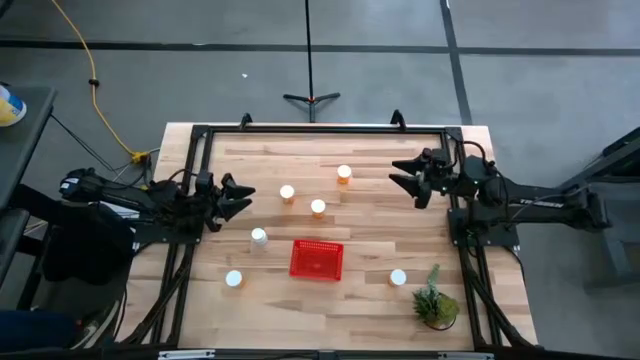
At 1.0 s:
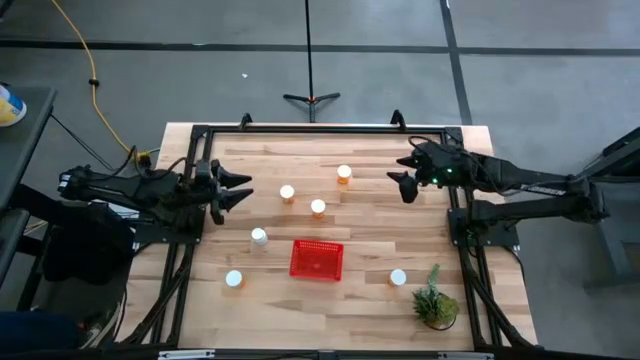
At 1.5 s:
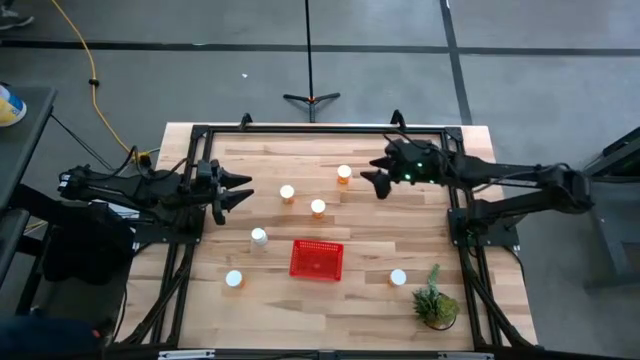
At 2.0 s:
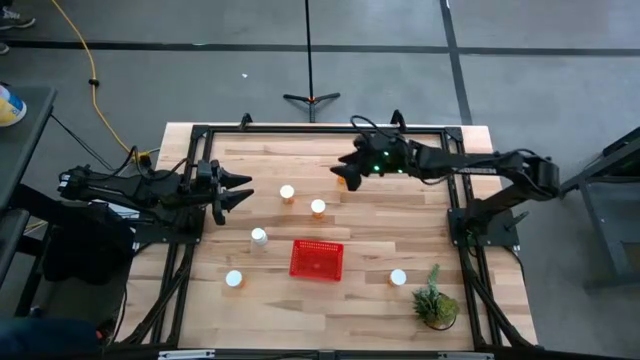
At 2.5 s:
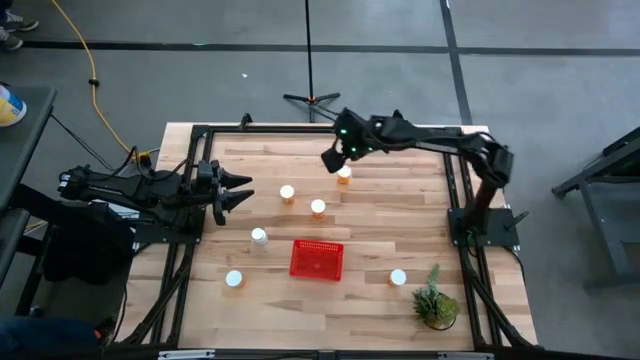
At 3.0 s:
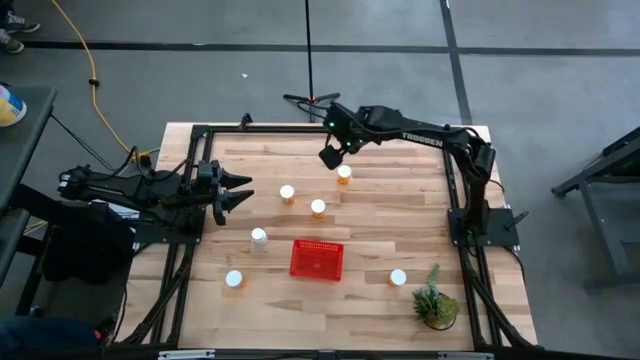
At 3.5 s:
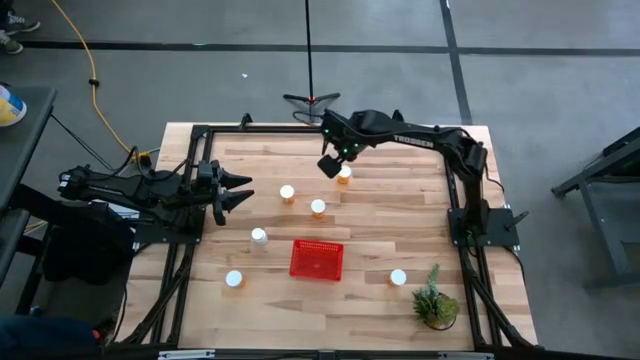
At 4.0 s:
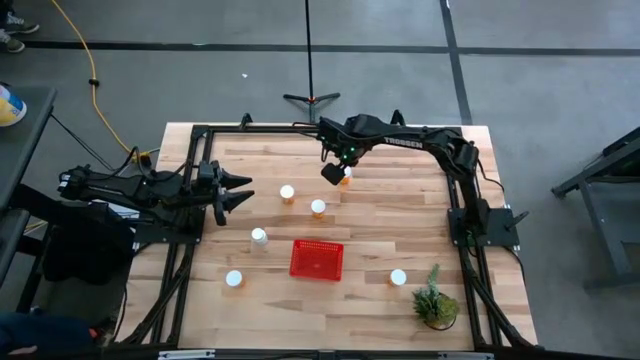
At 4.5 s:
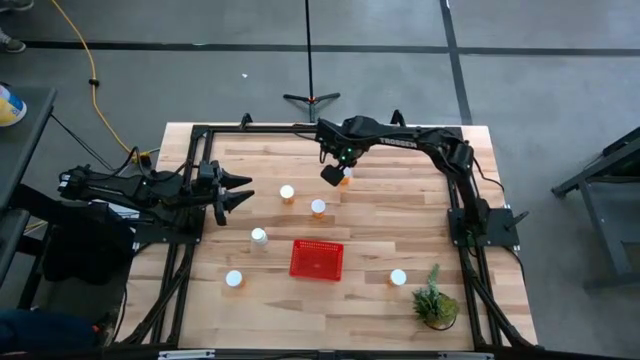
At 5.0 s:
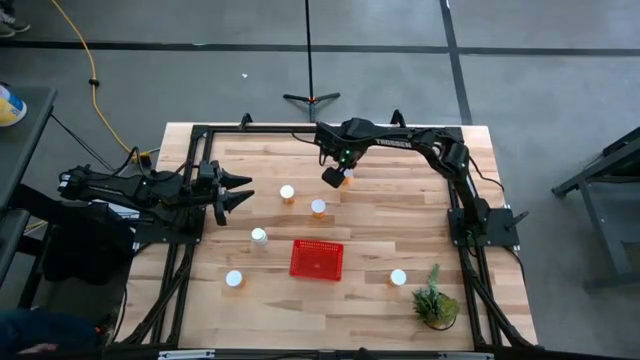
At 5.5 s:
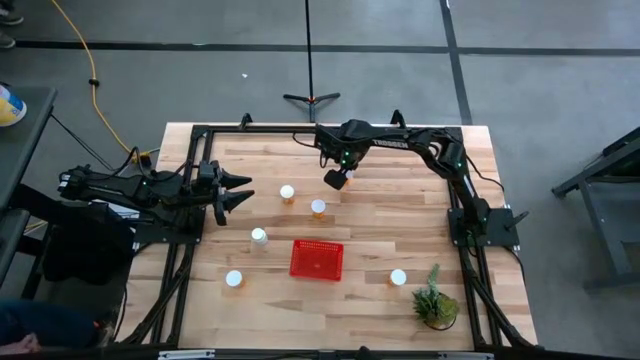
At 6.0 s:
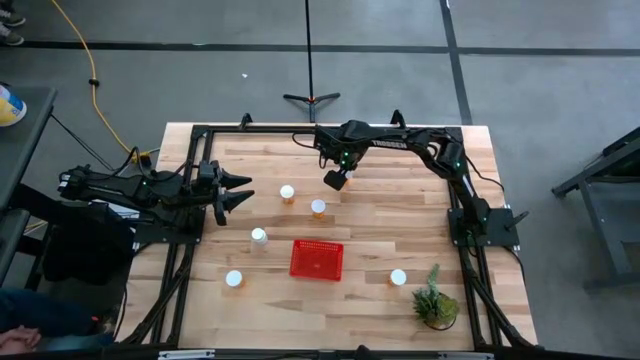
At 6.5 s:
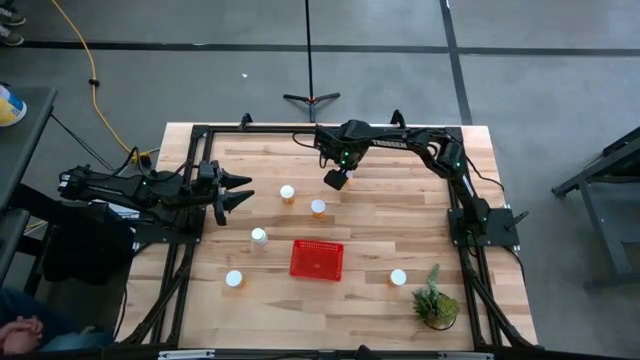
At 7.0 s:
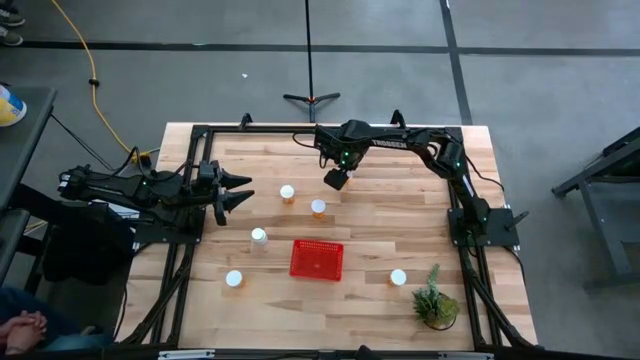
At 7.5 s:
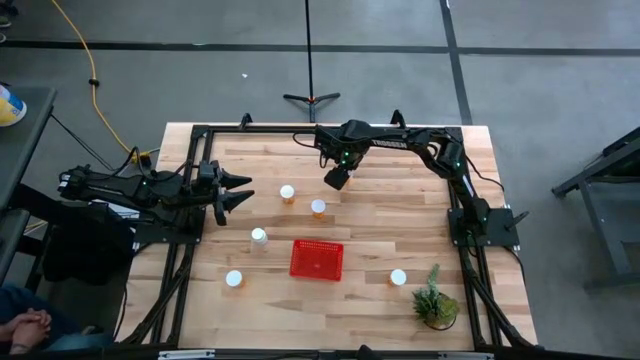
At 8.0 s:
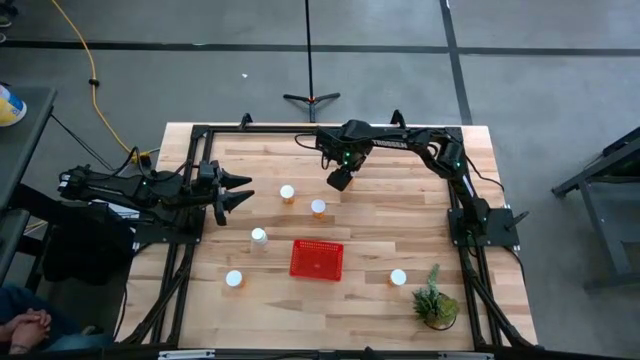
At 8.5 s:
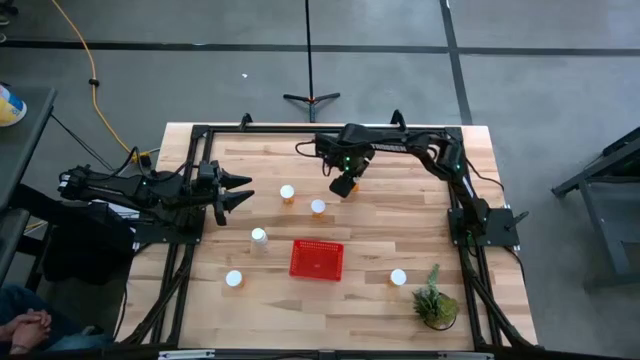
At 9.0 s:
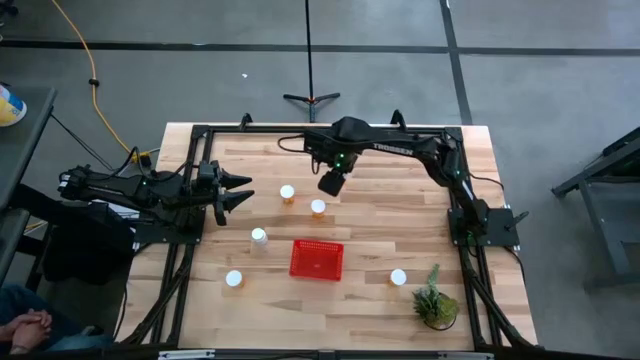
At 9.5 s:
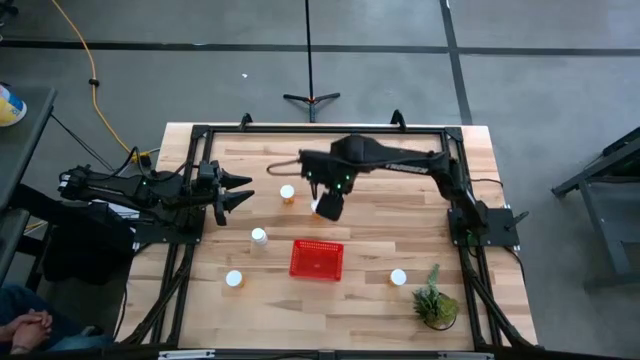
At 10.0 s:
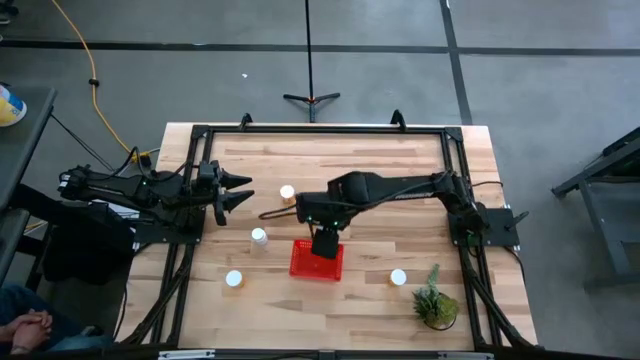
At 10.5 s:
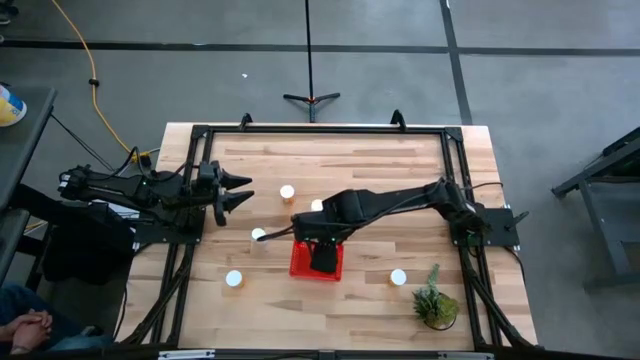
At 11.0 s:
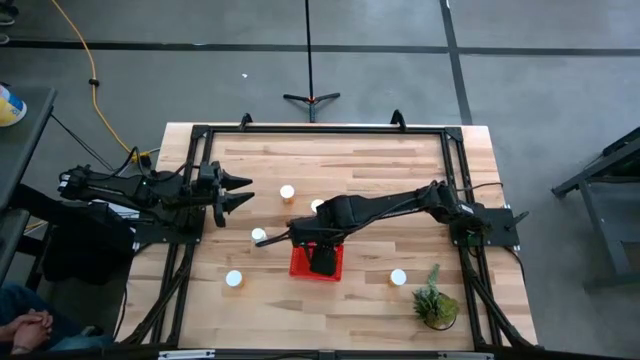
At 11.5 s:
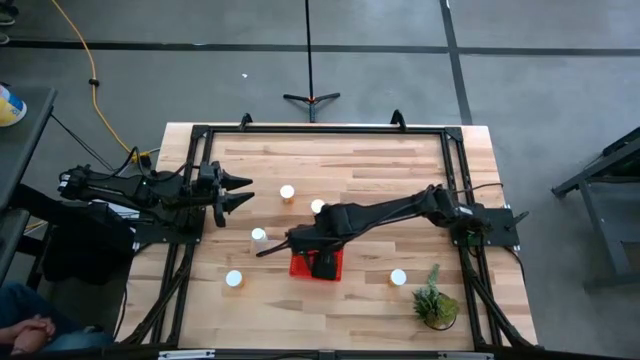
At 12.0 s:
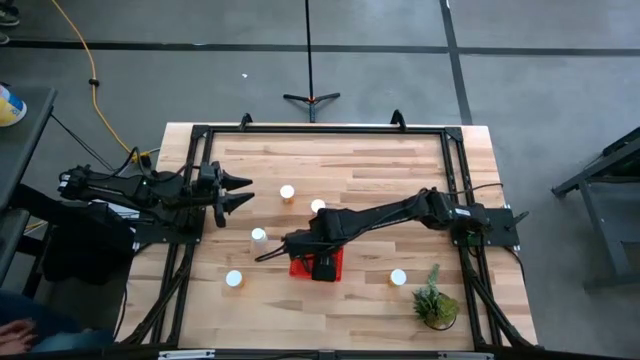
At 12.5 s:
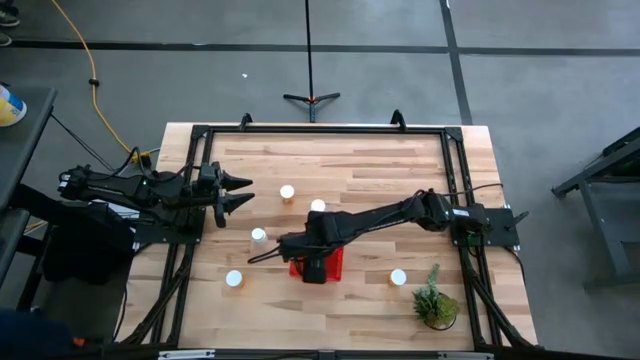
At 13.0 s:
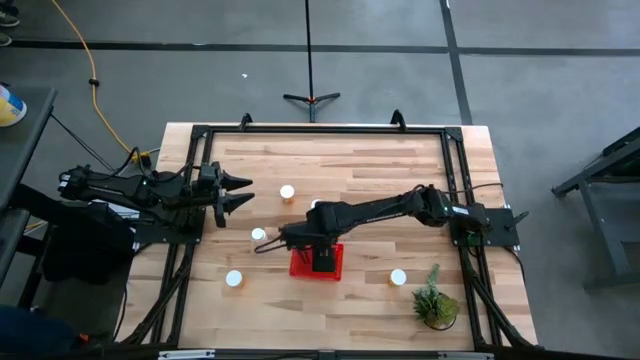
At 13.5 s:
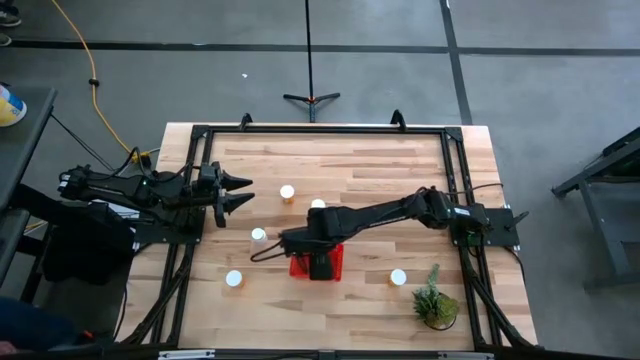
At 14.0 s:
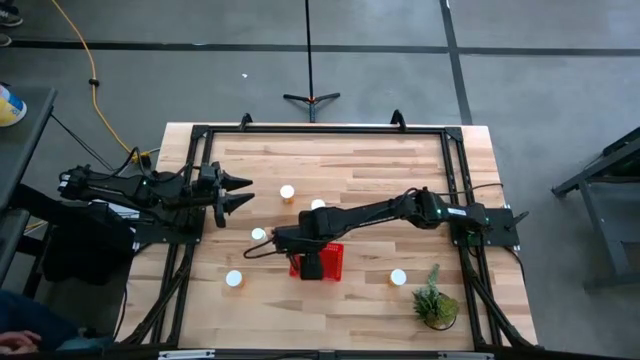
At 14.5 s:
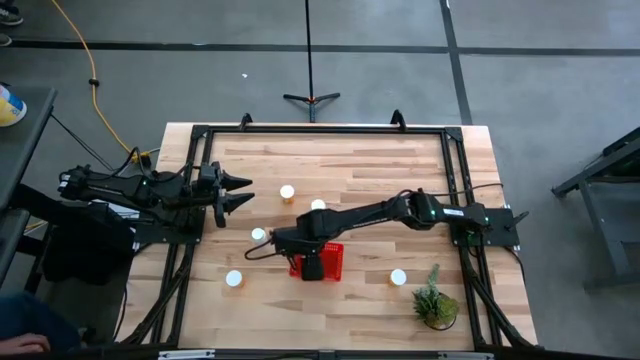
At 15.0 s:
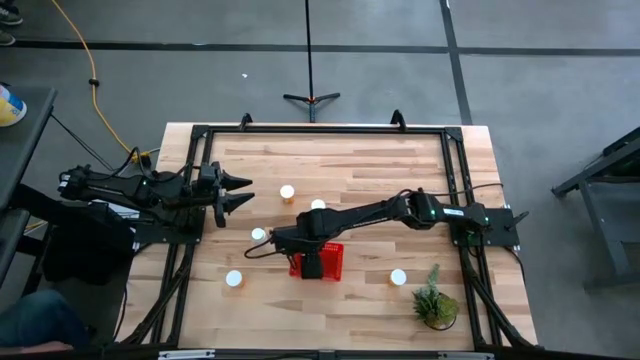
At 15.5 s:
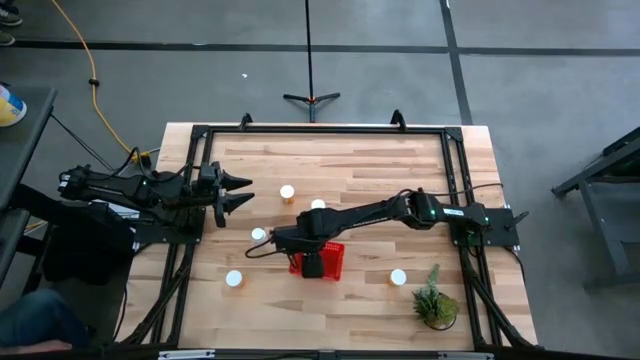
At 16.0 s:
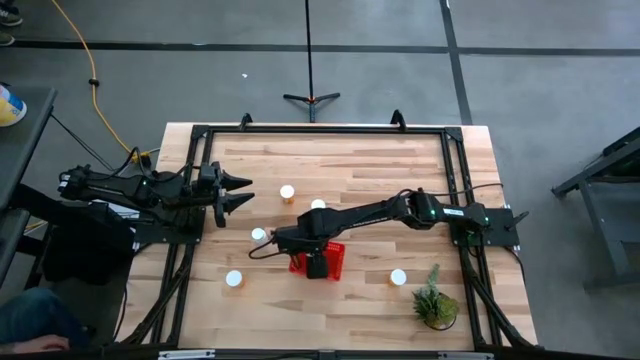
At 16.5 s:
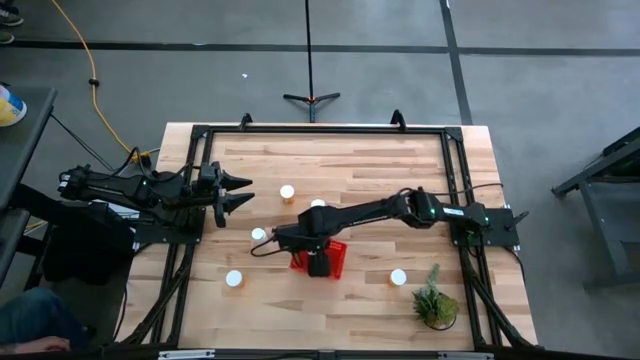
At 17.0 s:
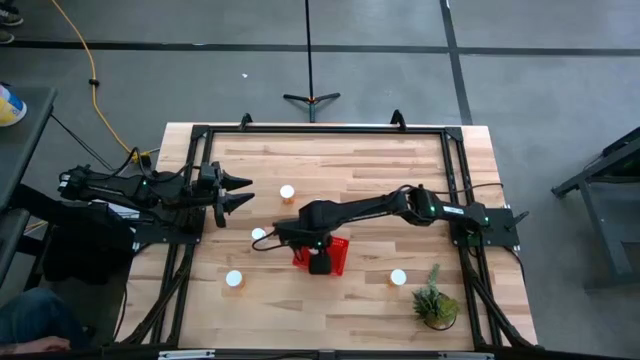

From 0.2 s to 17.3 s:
Task: Pick and place pill bottles into a basket
Put the orange pill bottle into the red bin
